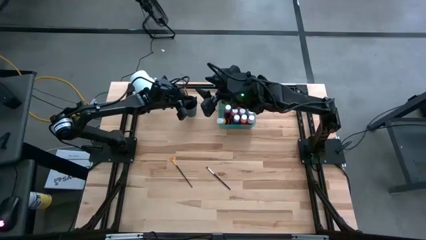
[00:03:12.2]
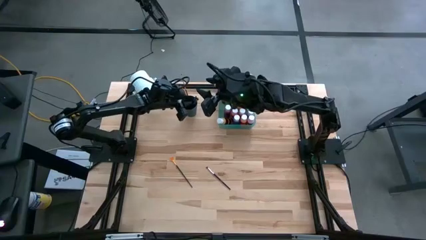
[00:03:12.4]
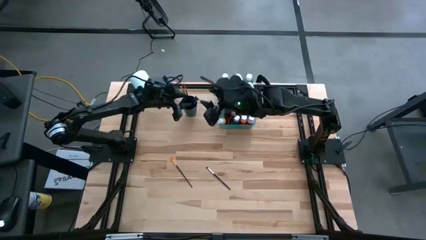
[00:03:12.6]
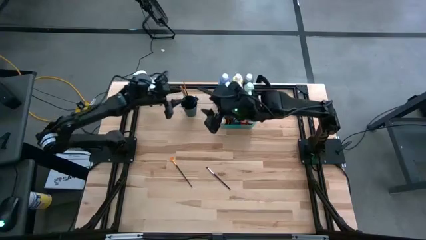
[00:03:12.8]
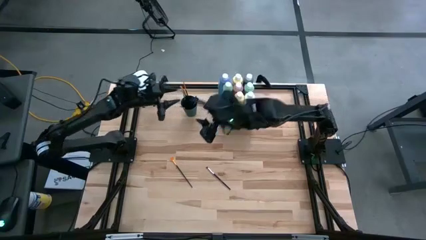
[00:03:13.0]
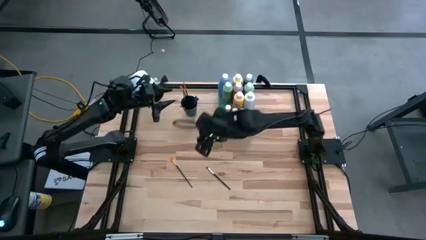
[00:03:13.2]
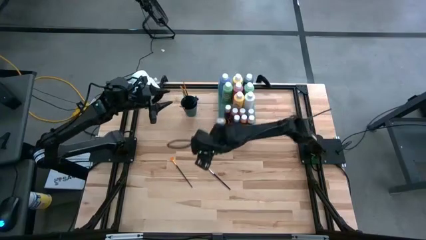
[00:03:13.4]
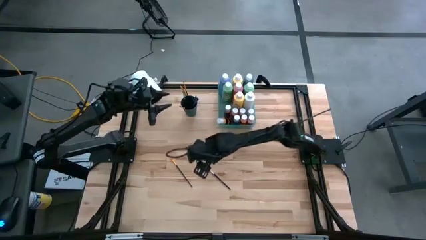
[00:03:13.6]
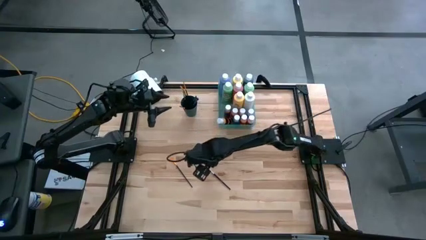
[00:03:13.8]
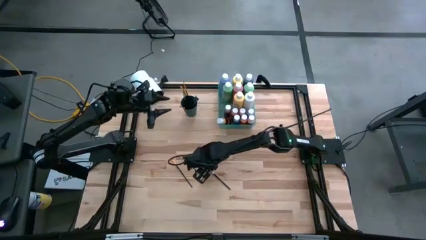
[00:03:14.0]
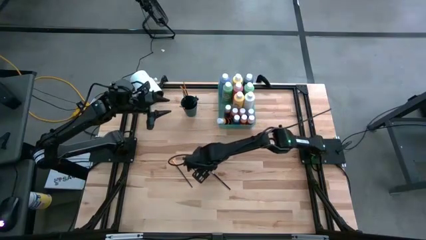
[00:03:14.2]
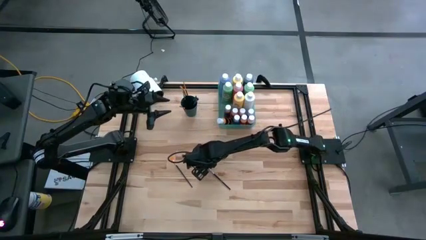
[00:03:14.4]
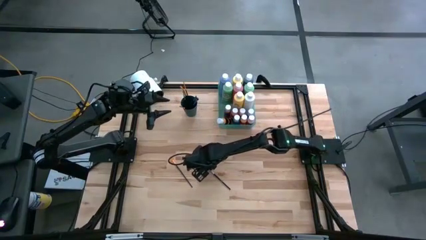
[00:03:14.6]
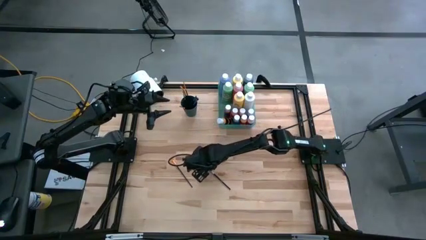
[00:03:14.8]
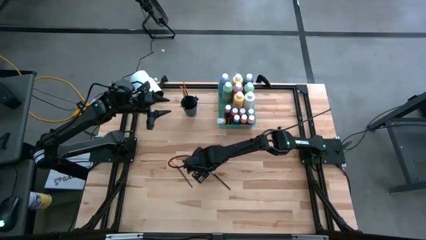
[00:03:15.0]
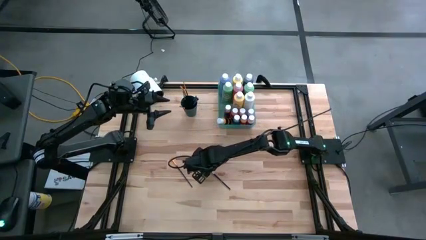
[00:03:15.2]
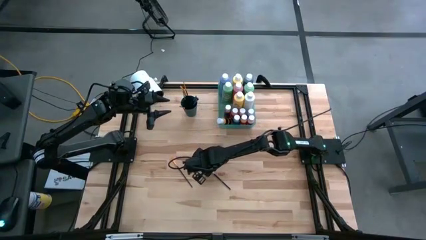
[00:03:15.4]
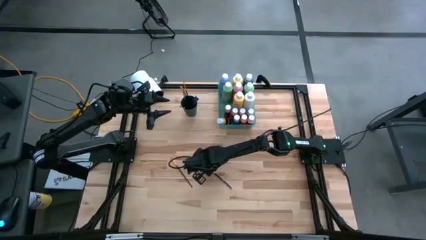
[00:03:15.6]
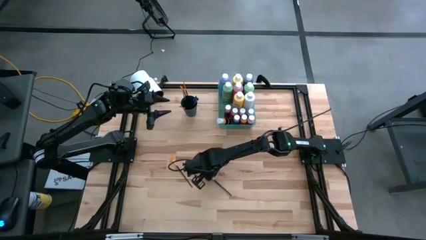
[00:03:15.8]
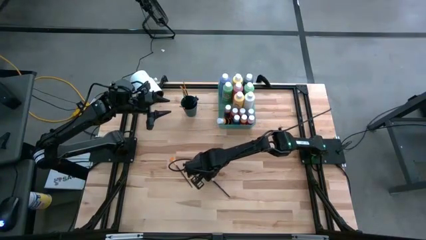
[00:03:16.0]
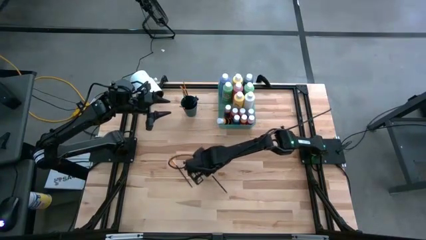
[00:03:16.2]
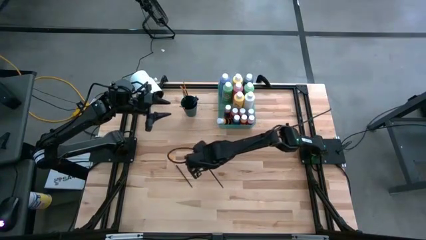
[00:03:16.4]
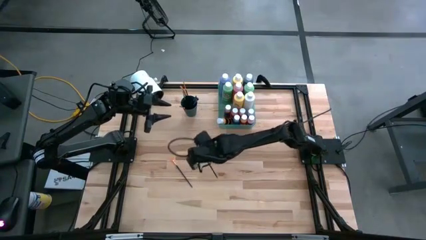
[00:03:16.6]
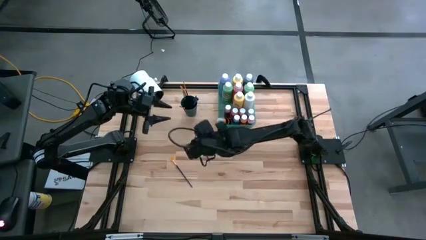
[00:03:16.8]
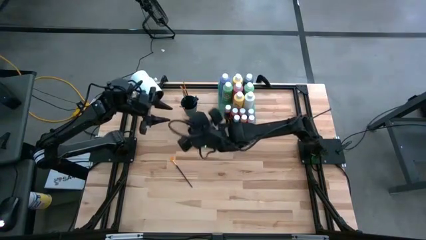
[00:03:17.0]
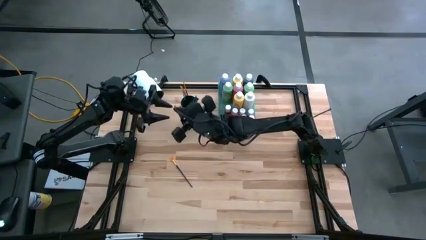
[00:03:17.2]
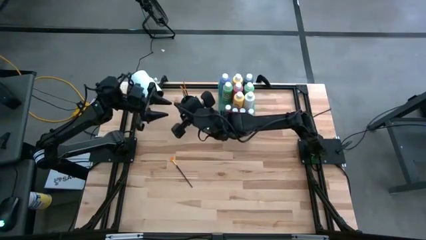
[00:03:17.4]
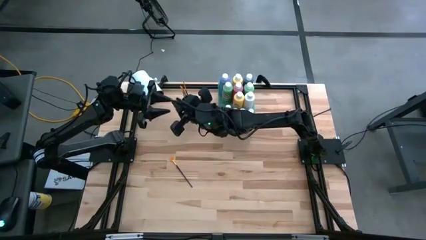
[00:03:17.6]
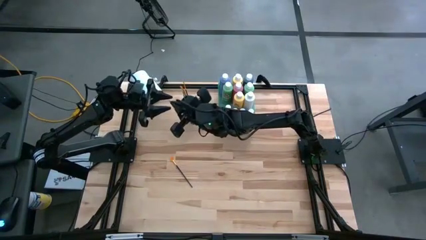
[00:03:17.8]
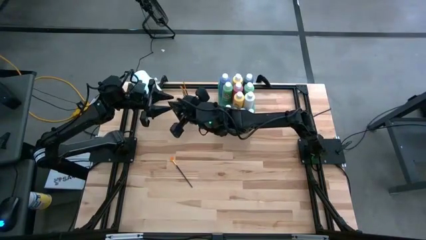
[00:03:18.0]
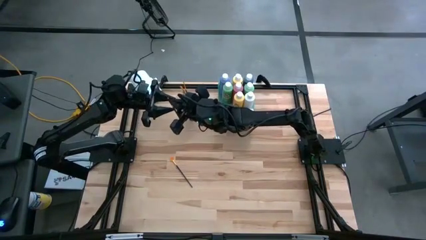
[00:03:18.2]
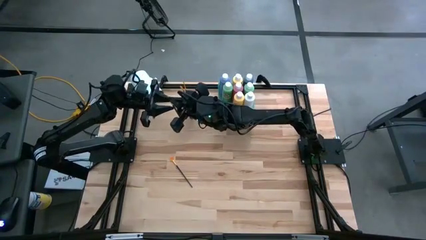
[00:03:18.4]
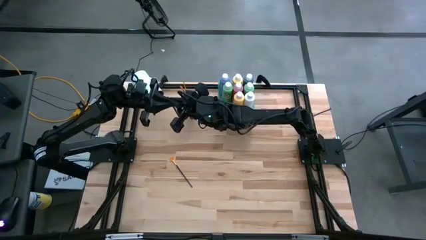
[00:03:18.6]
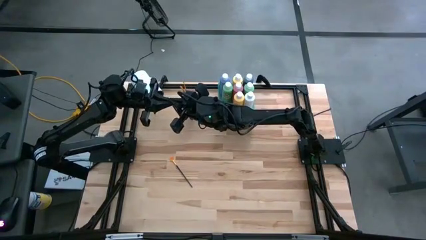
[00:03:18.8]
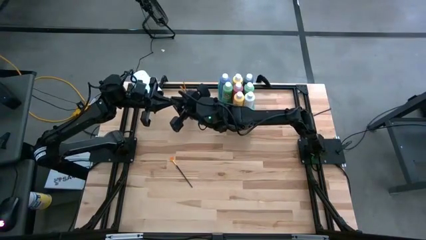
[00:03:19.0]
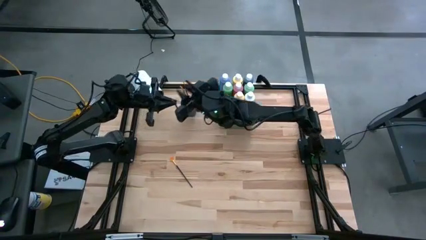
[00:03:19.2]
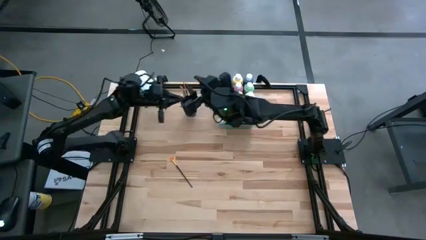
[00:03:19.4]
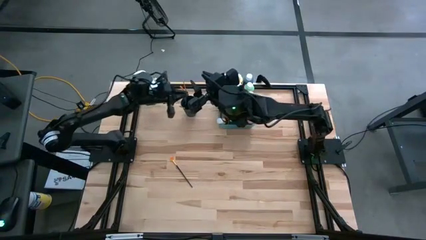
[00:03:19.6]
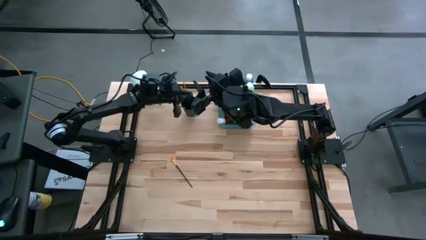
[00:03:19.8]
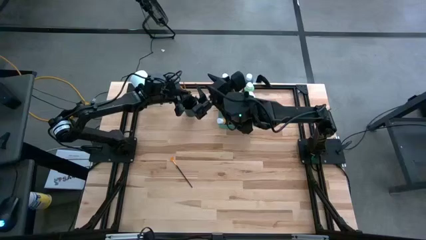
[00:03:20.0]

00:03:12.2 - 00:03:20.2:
Task: Pick & Place Paint Supplies
Put the black silver paint brush into the black cup

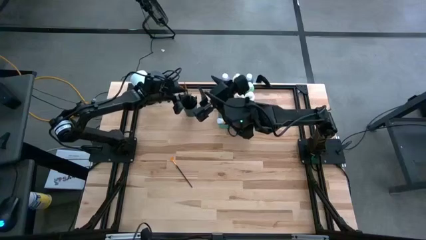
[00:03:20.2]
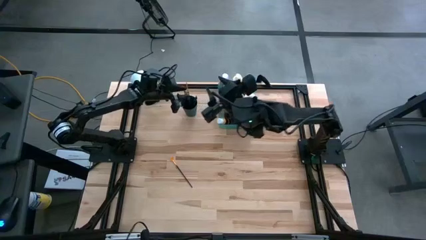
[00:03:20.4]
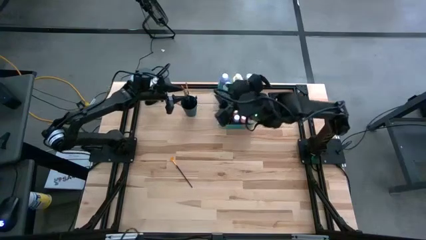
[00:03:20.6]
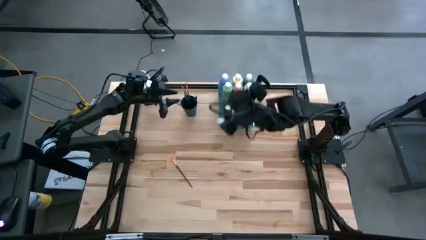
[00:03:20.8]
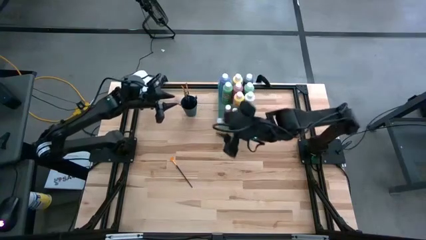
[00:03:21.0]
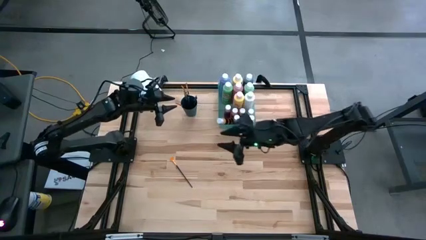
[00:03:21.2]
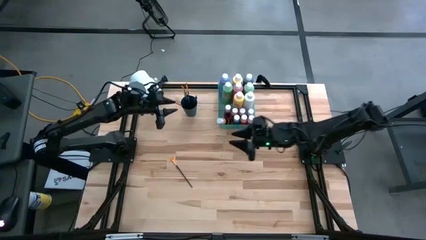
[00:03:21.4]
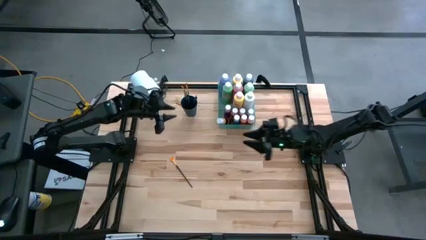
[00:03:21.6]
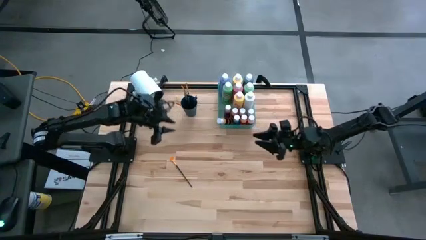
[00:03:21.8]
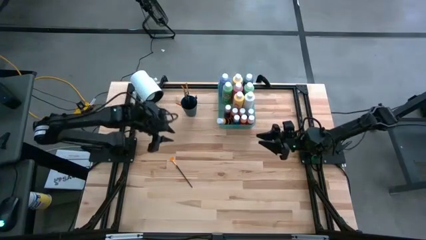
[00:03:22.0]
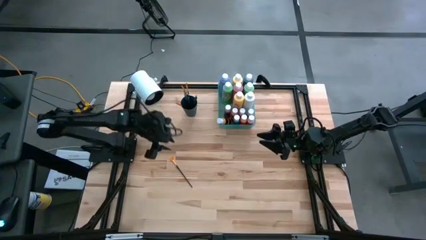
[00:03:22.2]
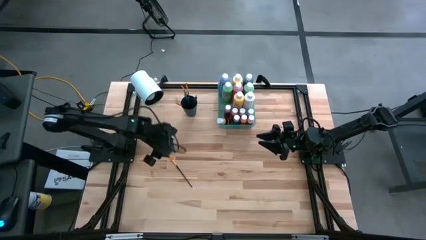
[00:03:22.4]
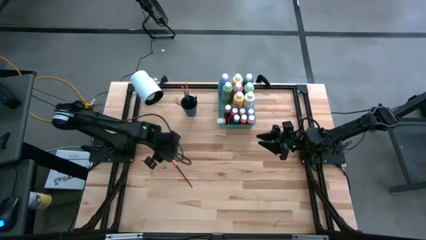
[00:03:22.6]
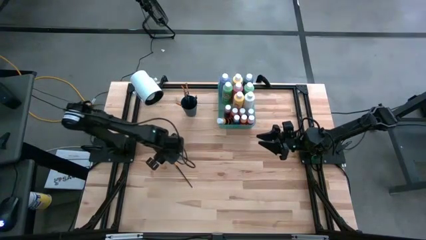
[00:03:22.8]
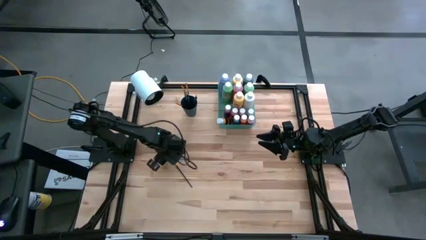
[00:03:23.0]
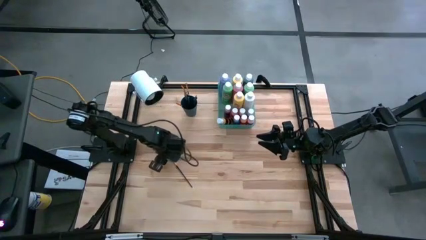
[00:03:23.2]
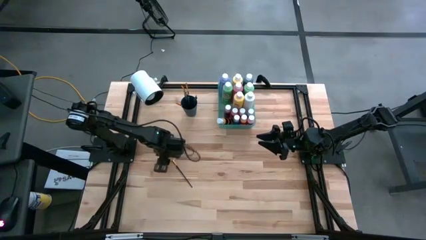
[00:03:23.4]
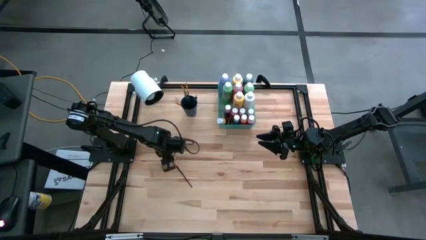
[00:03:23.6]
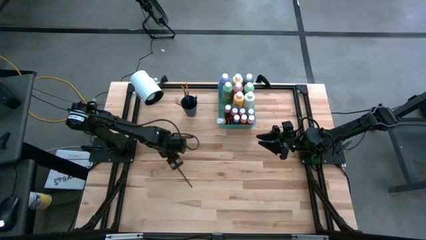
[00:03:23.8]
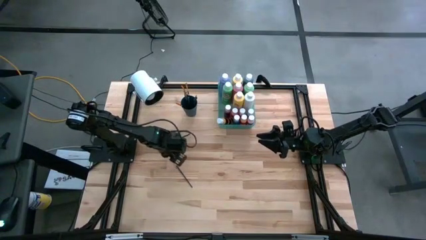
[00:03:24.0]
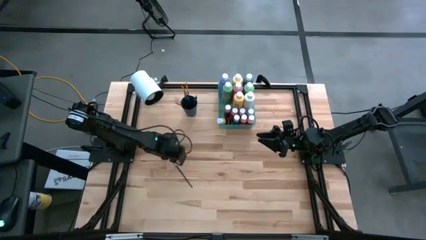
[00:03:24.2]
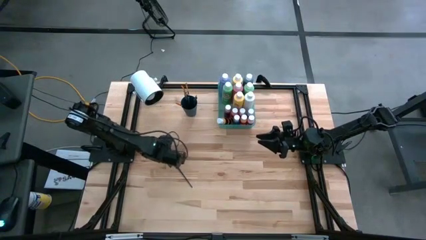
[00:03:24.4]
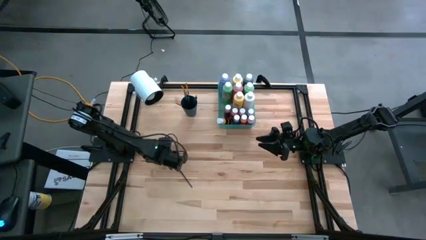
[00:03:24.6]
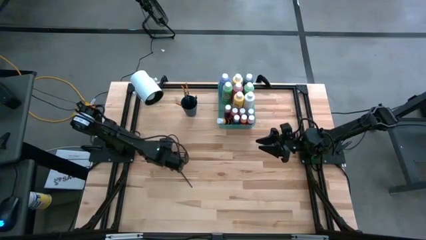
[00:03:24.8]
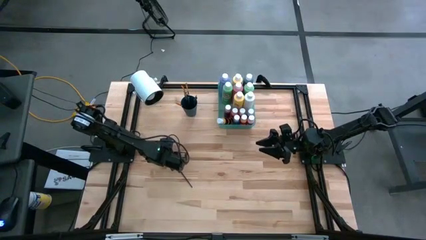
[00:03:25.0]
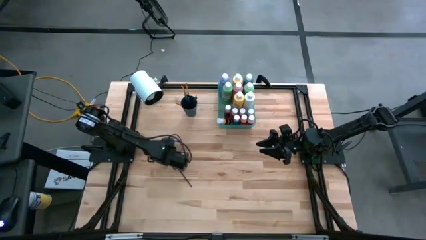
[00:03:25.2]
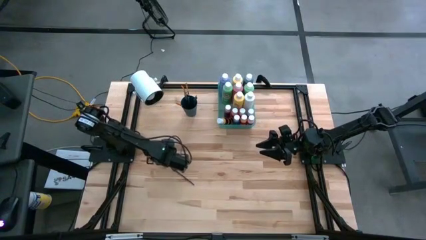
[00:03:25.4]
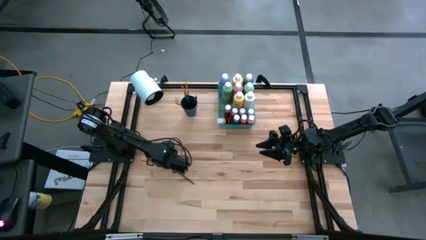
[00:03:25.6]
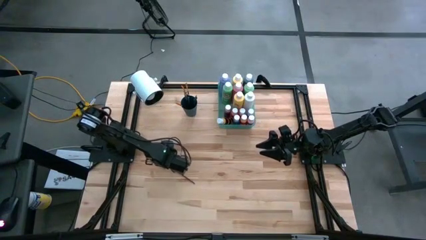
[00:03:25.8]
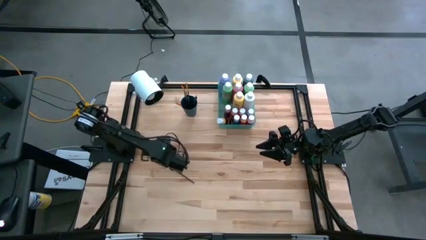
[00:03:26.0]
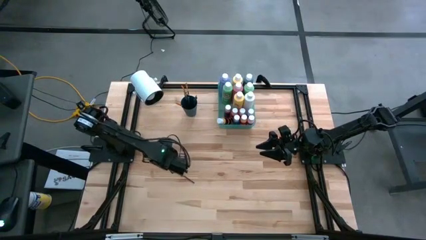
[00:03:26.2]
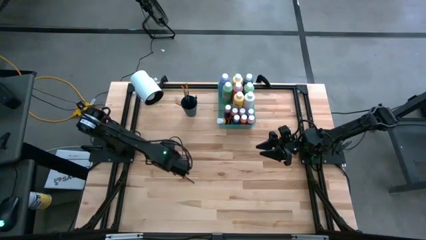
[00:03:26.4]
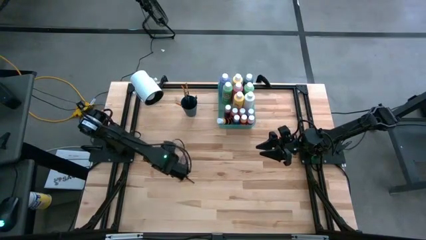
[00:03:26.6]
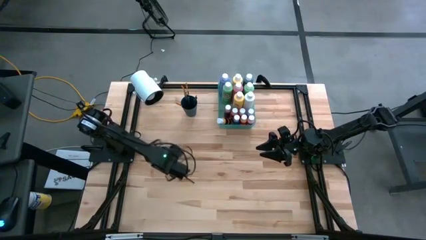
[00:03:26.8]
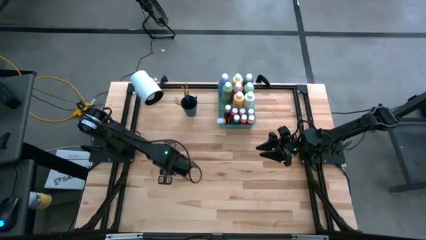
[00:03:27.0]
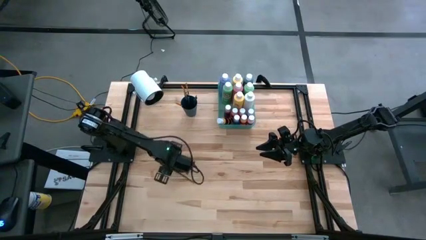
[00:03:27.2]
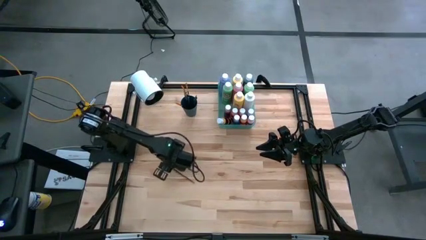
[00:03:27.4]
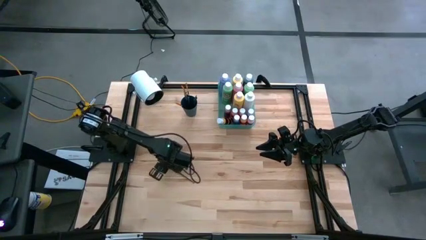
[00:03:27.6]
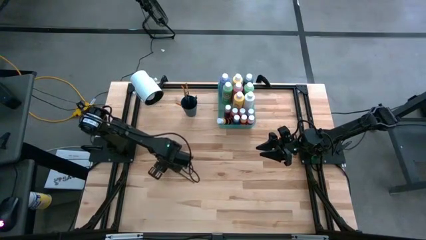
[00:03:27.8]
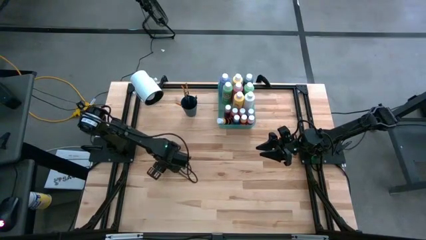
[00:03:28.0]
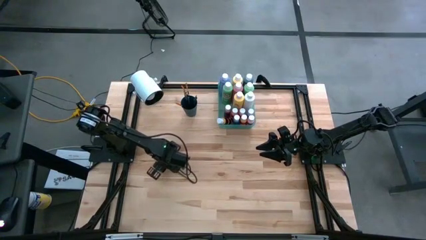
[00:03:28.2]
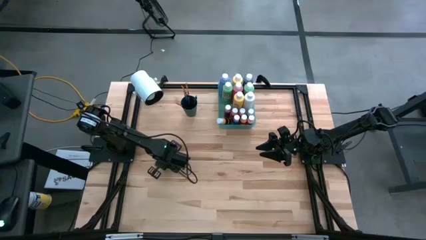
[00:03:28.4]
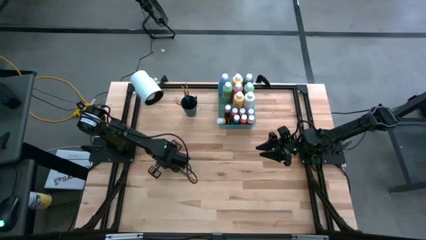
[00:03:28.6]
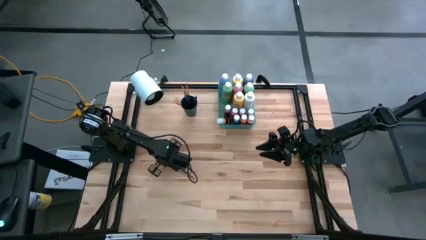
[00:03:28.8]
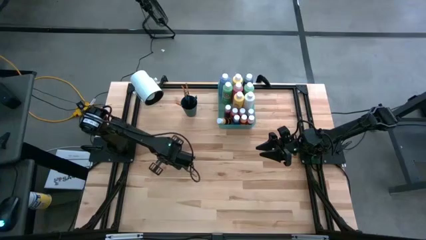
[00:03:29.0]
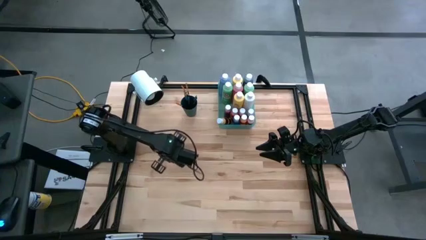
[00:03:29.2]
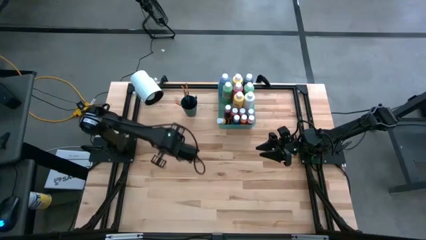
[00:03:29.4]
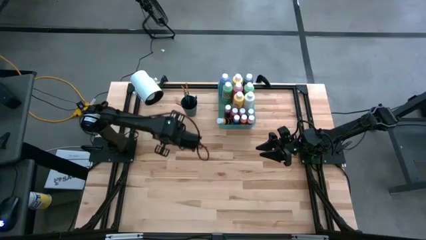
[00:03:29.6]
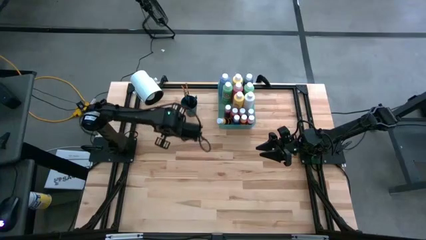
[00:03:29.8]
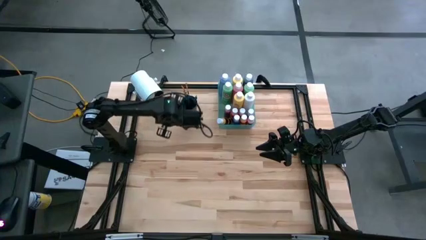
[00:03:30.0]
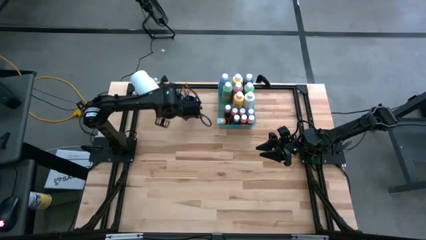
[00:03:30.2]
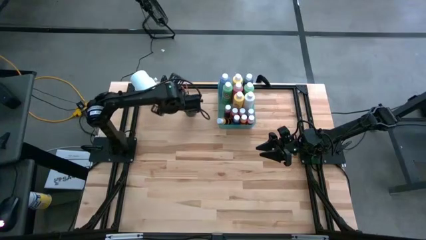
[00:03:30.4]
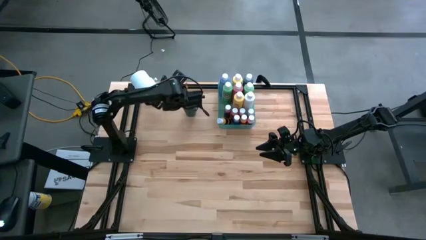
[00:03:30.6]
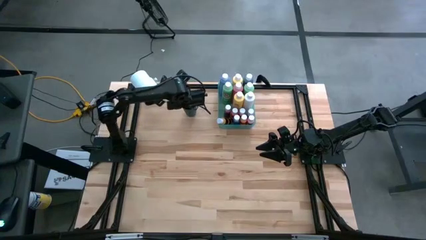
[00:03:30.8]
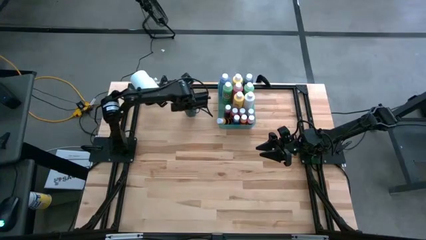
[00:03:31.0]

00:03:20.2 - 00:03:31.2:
Put the black gold paint brush into the black cup
